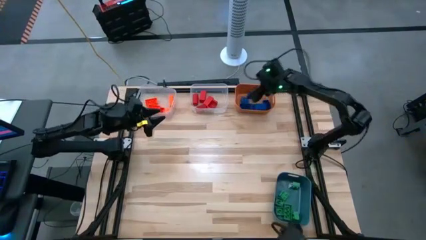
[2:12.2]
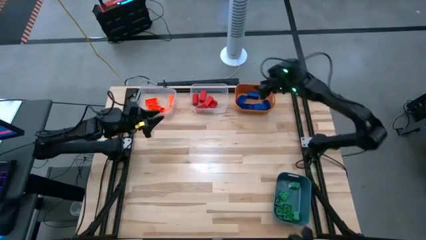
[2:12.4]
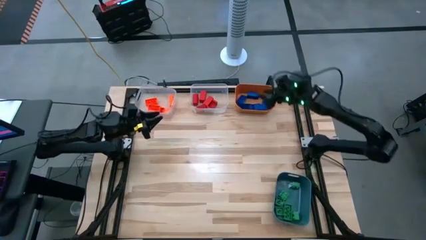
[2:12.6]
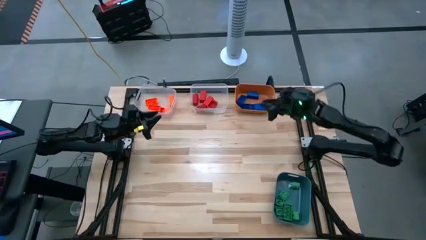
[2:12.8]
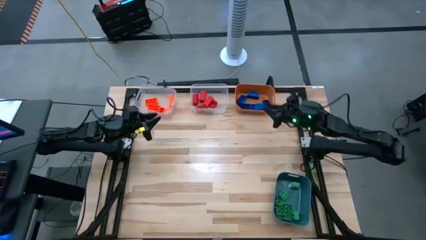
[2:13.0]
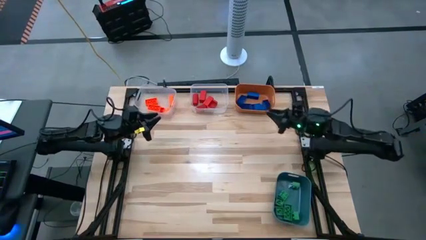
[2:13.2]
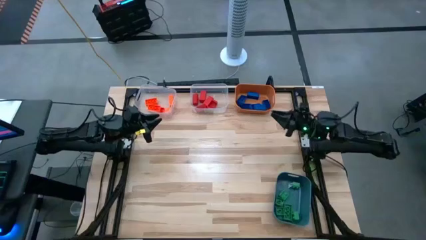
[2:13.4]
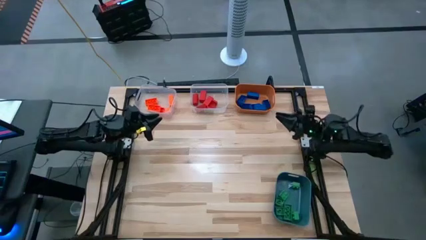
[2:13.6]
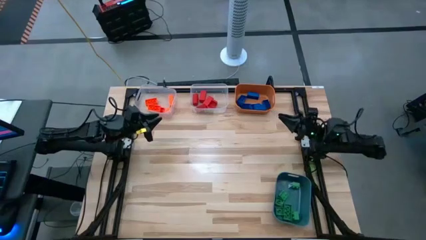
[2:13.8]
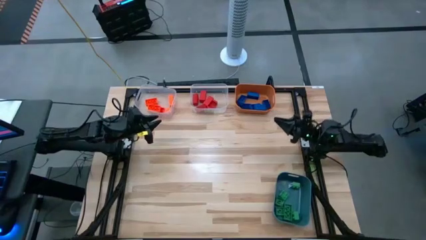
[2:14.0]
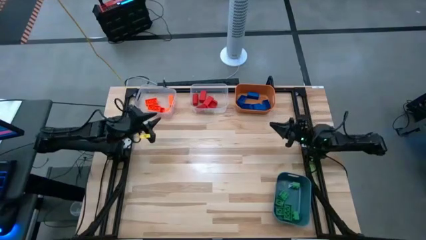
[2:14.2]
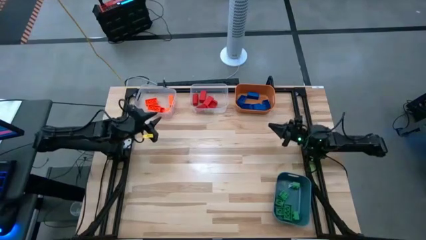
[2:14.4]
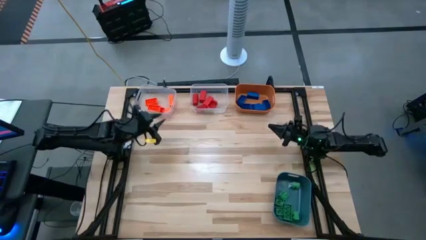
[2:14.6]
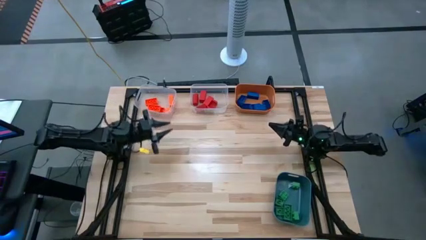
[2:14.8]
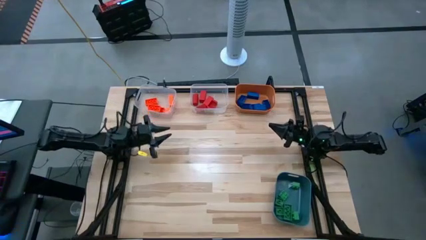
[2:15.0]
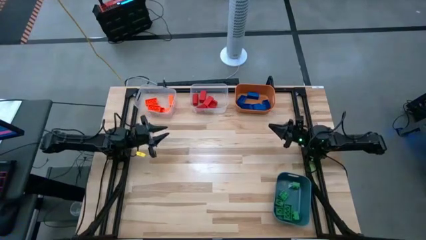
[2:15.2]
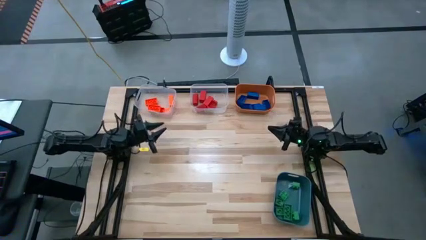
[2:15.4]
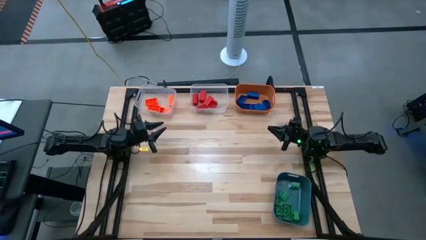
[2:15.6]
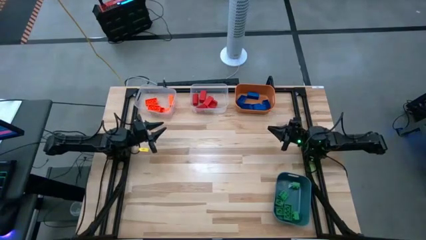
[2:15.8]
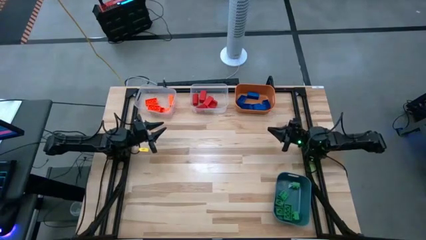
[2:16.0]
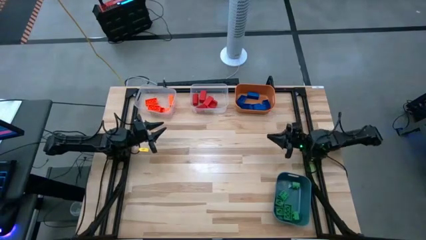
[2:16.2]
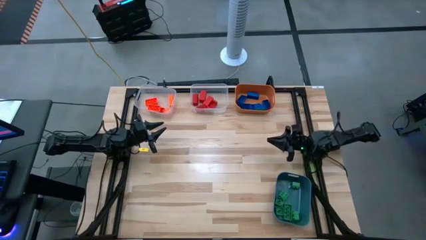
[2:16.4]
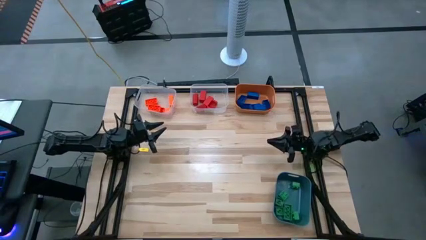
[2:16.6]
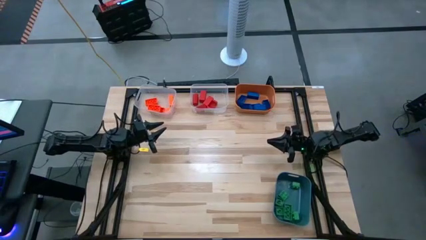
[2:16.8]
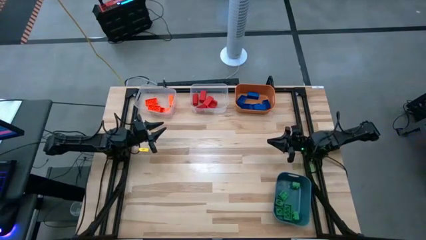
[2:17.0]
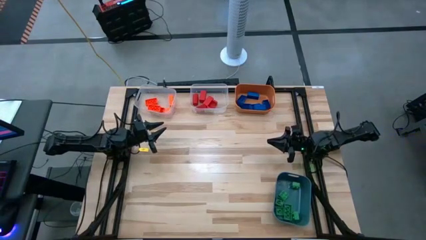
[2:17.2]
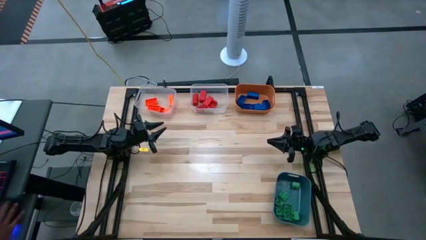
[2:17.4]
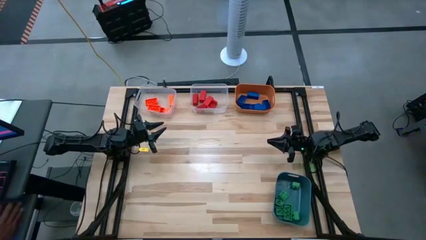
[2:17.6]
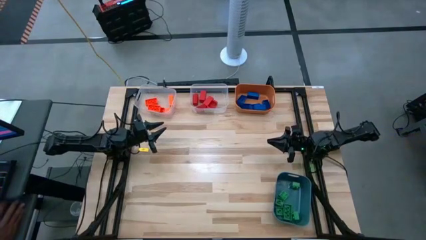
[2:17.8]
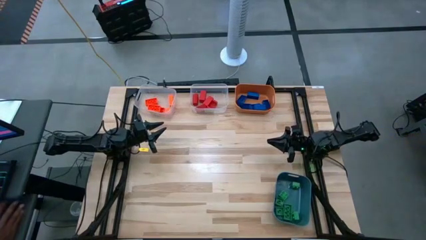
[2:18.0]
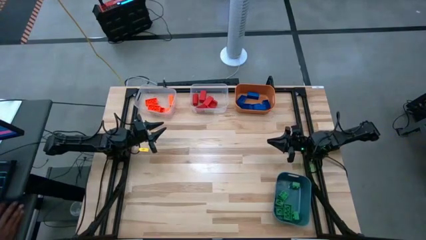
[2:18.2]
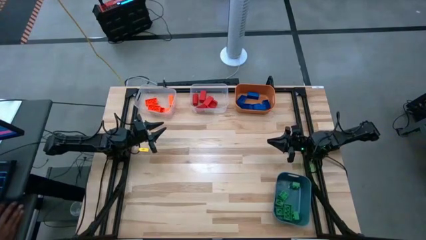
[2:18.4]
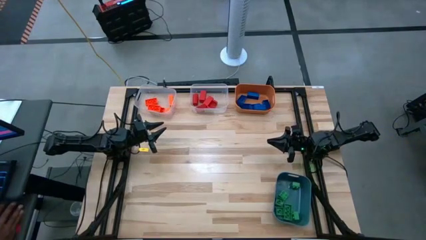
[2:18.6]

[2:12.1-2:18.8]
Task: Sort blocks
Return to Home Position

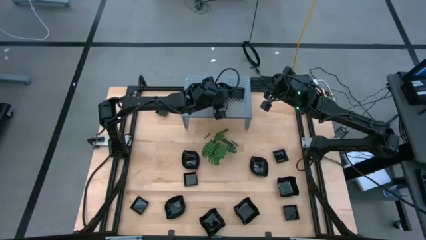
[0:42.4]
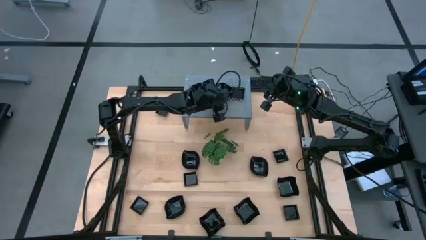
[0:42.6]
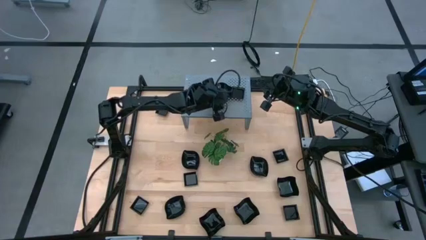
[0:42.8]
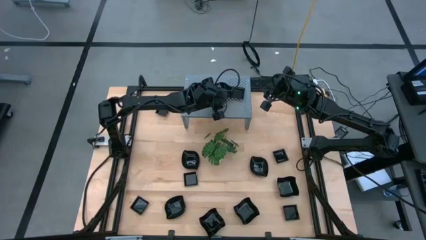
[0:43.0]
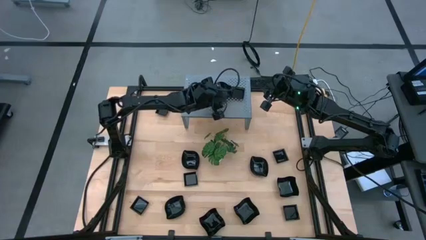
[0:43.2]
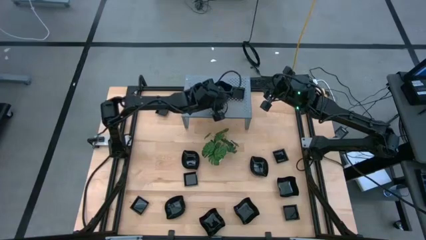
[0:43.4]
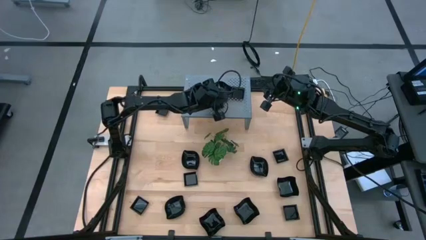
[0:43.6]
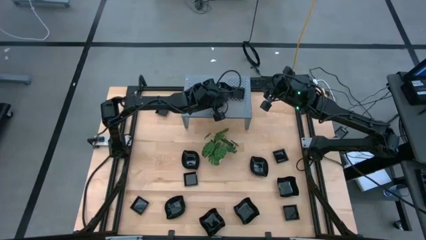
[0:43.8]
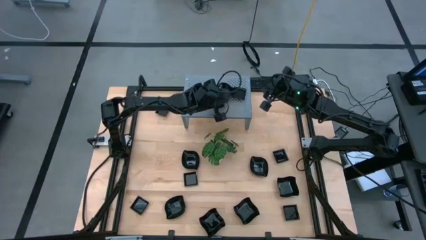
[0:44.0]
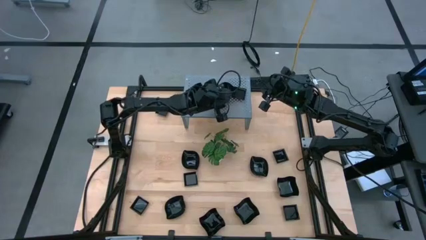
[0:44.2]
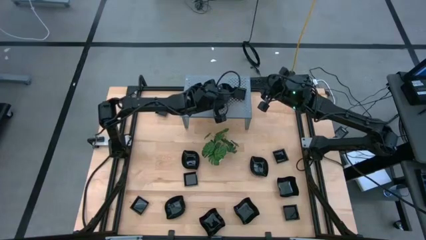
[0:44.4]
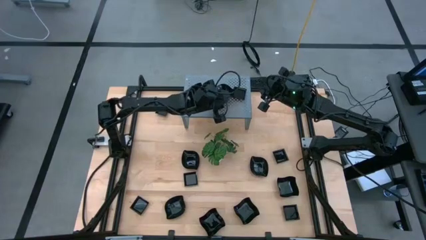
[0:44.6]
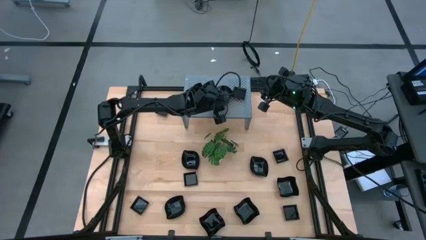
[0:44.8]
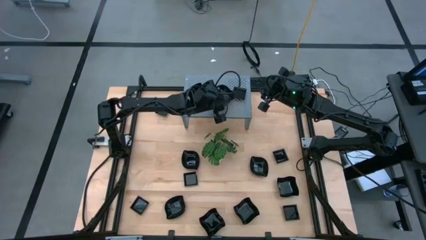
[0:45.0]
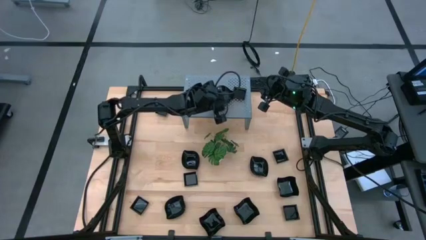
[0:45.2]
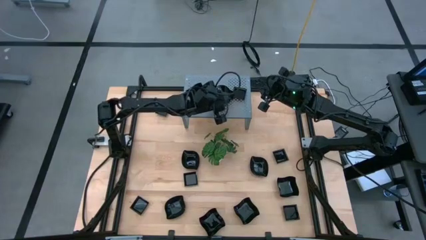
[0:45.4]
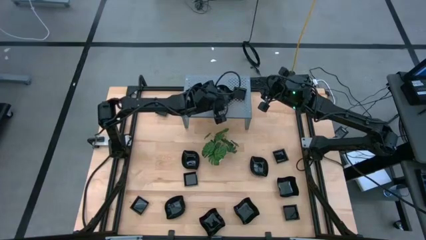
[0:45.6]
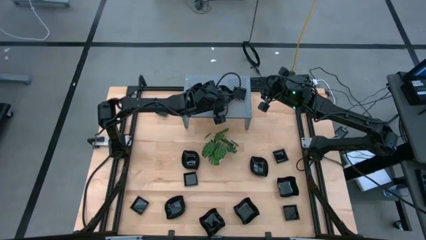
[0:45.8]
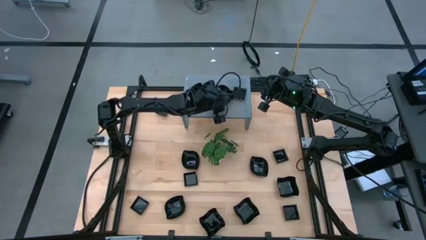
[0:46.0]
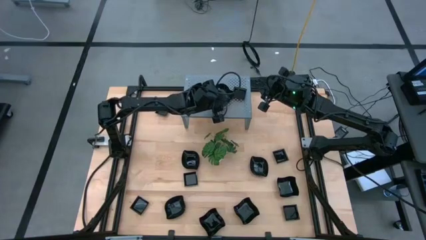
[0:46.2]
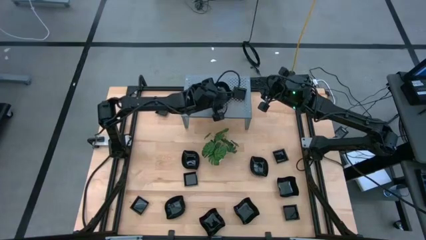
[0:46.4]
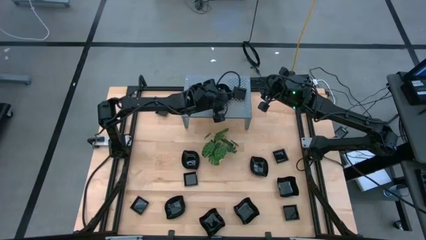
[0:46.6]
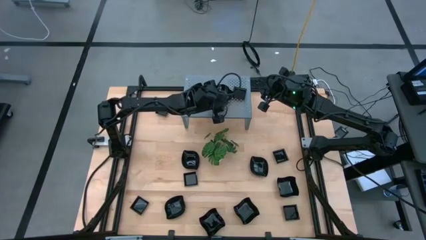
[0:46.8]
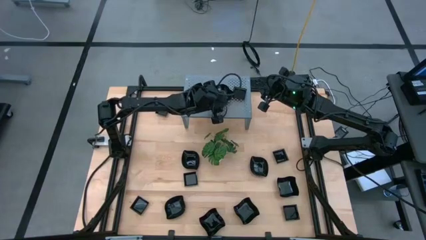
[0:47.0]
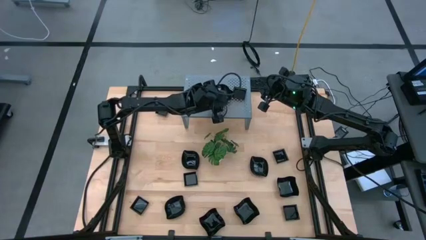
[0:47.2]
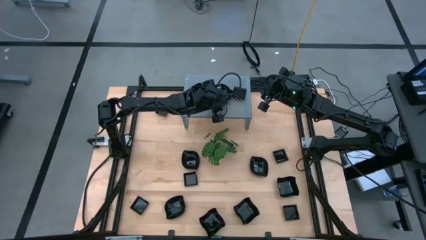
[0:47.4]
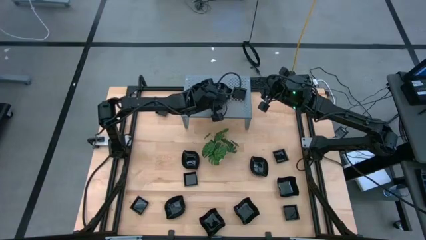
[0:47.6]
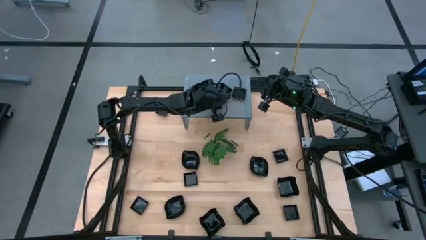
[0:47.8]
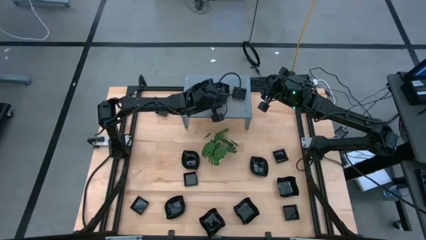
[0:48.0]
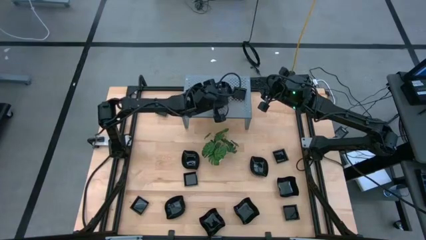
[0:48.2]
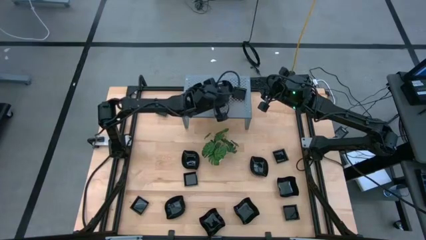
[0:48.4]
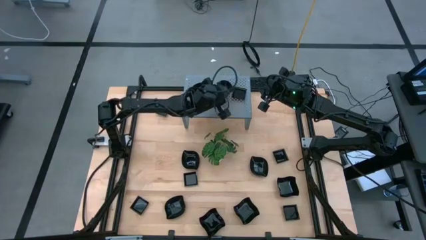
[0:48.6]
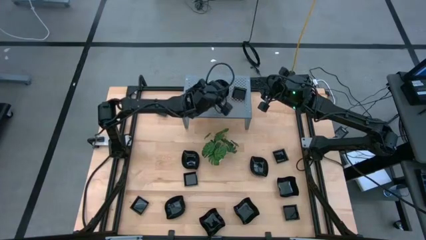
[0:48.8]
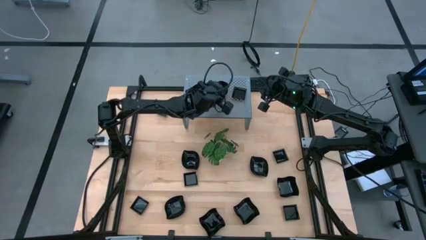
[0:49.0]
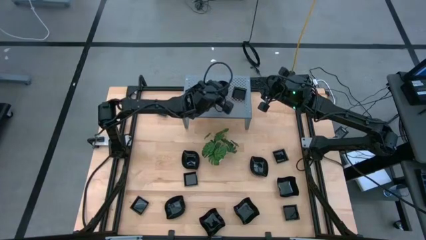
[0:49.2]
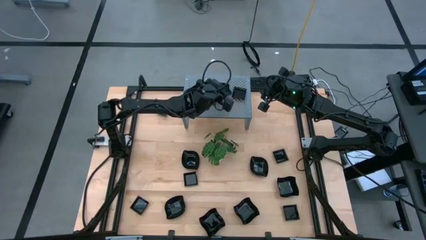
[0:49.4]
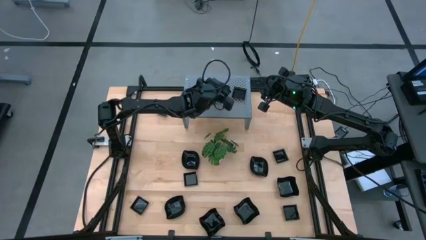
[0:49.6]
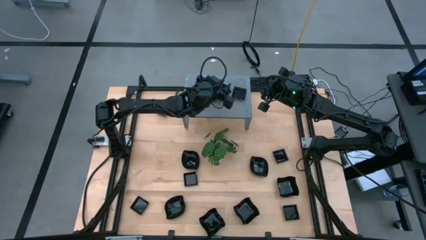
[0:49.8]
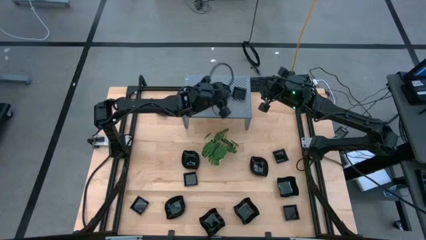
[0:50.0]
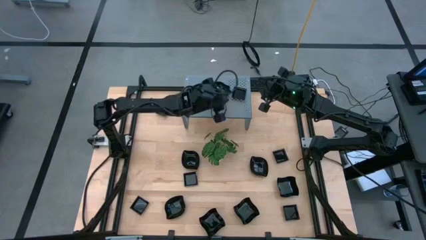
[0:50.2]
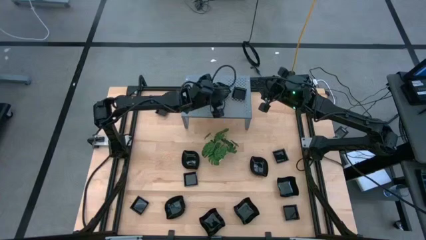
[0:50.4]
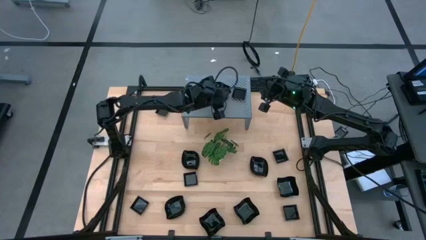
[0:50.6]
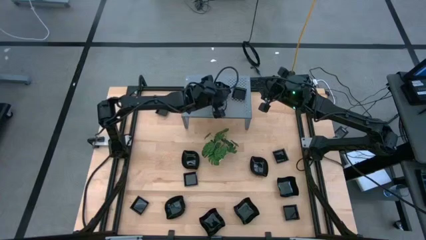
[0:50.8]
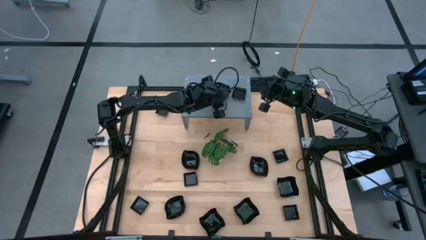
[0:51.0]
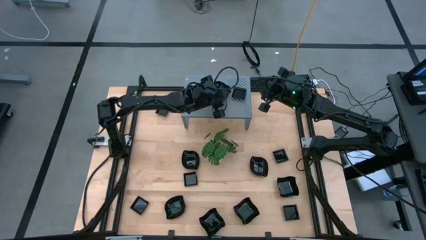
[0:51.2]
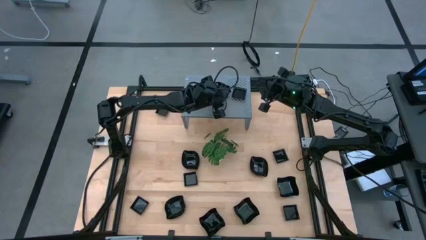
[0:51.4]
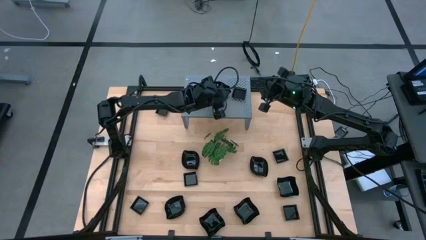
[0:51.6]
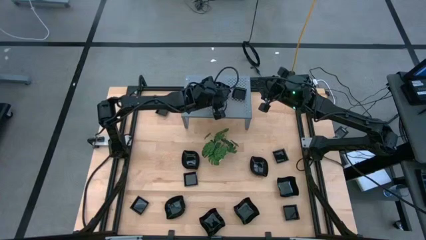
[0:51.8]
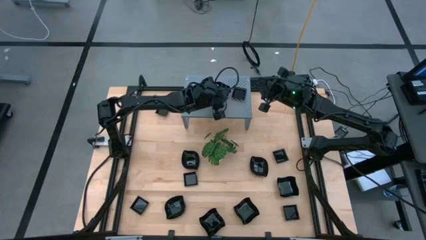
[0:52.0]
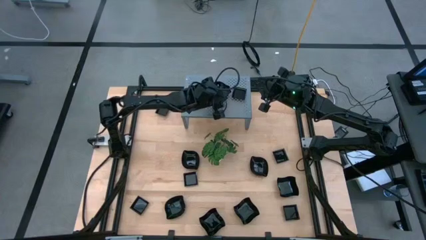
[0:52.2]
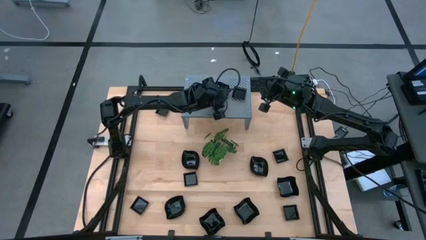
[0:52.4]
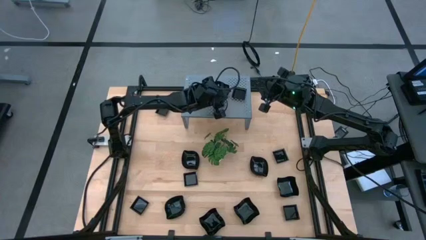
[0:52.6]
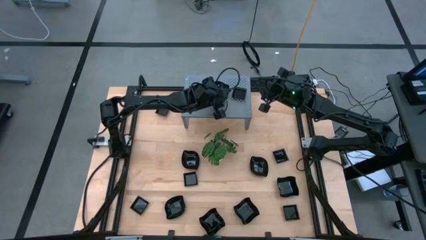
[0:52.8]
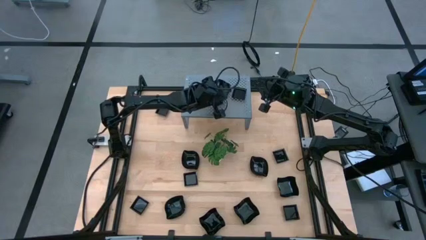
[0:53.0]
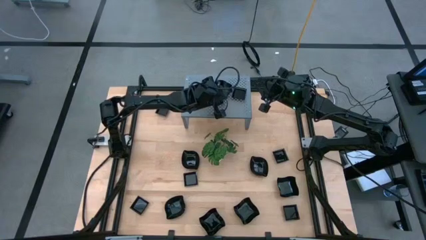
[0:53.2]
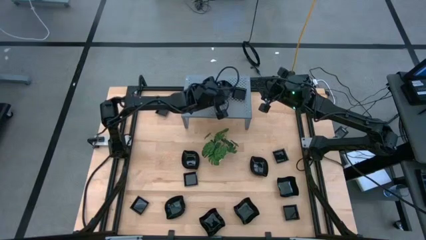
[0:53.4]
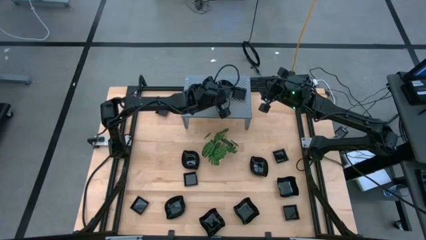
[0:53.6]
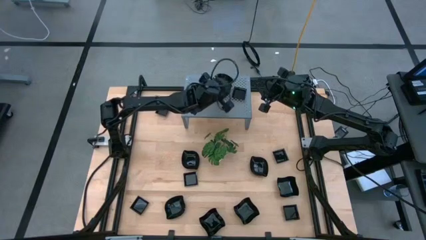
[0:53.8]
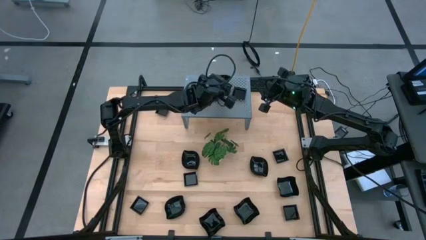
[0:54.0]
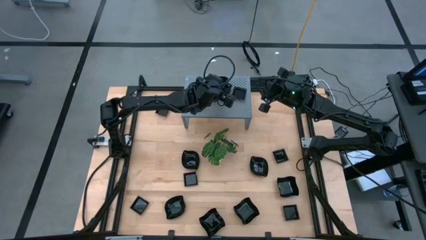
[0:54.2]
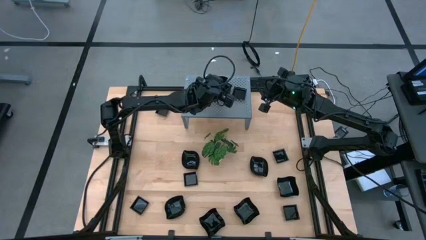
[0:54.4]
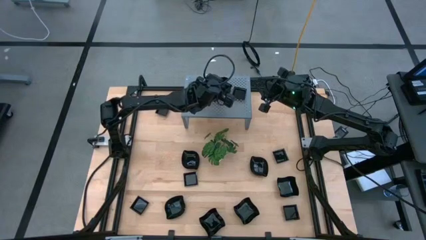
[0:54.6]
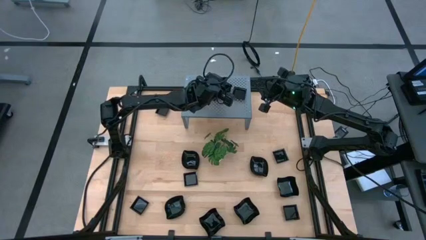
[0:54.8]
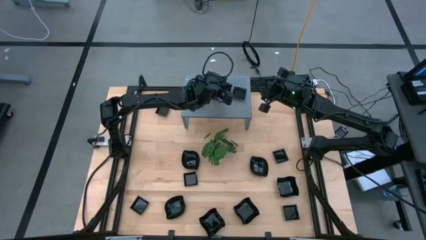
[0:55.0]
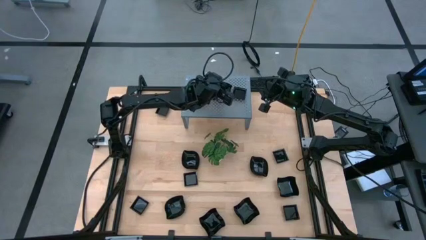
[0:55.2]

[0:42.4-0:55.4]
Task: Pick & Place Mini shaped plates
Stack the leaf-shaped plate on top of the leaf-shaped plate on the shelf
